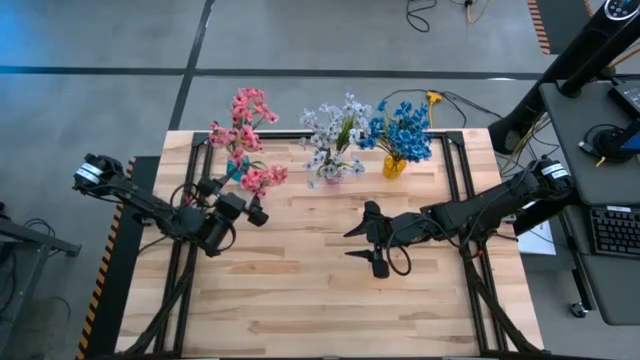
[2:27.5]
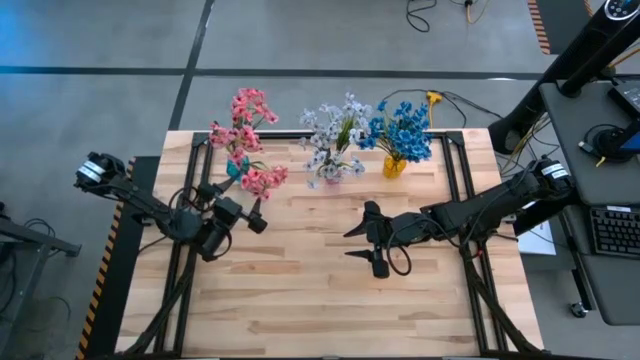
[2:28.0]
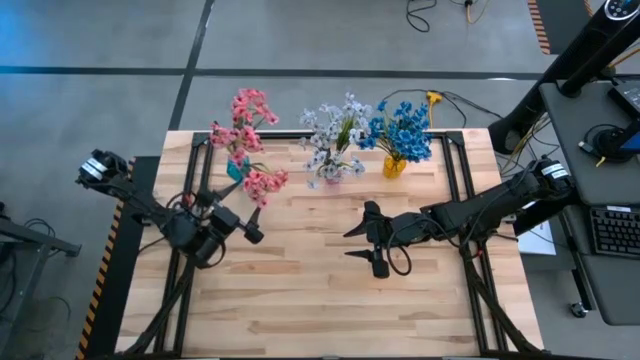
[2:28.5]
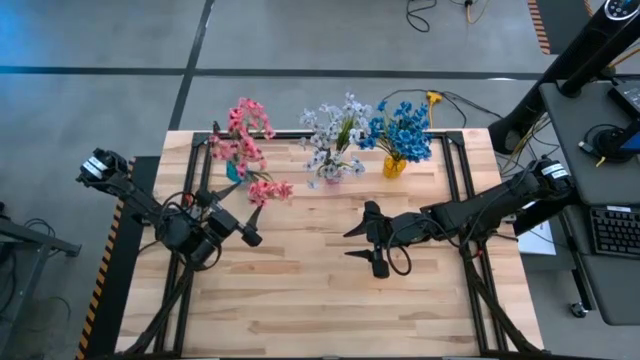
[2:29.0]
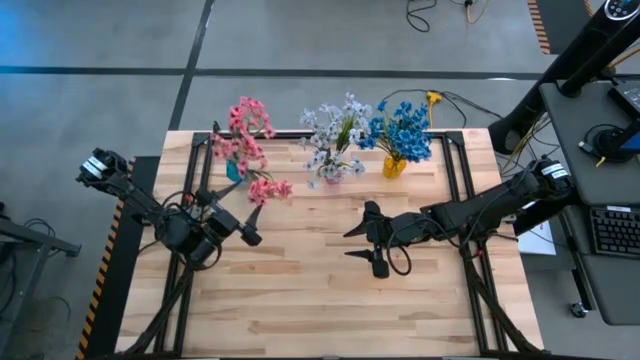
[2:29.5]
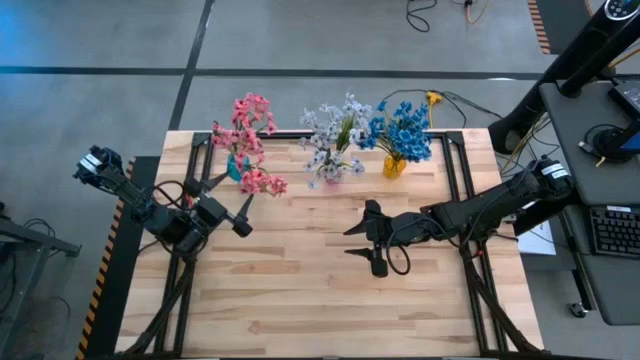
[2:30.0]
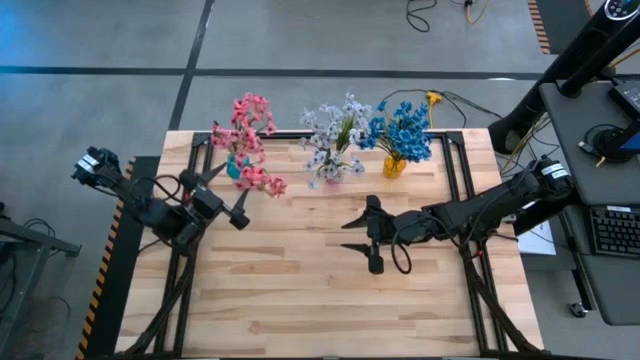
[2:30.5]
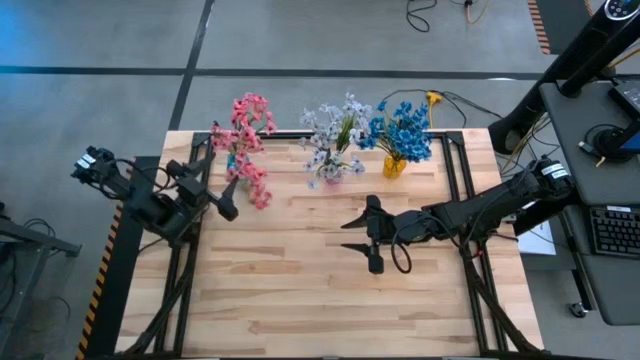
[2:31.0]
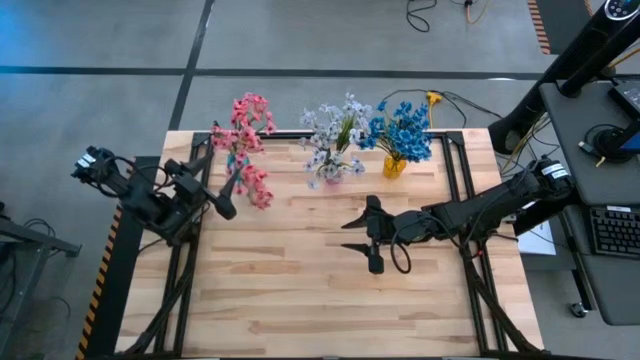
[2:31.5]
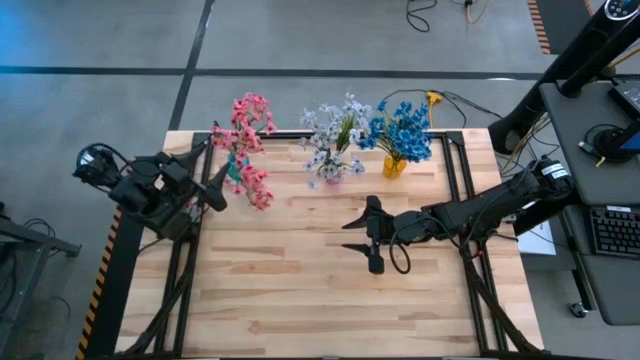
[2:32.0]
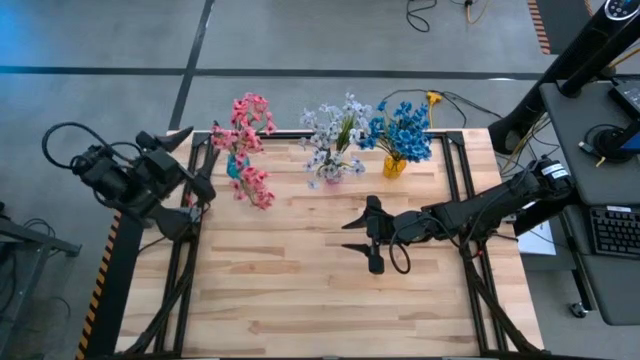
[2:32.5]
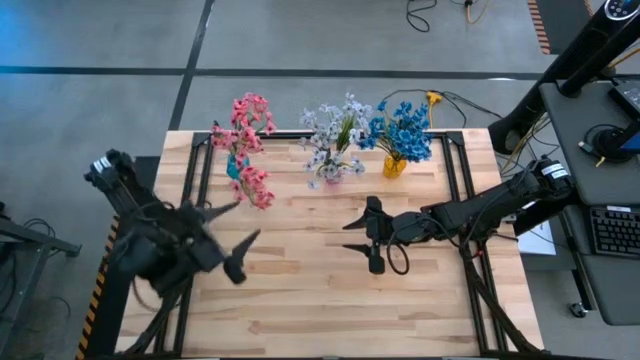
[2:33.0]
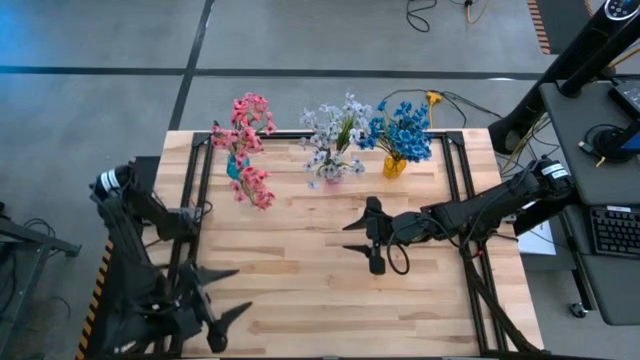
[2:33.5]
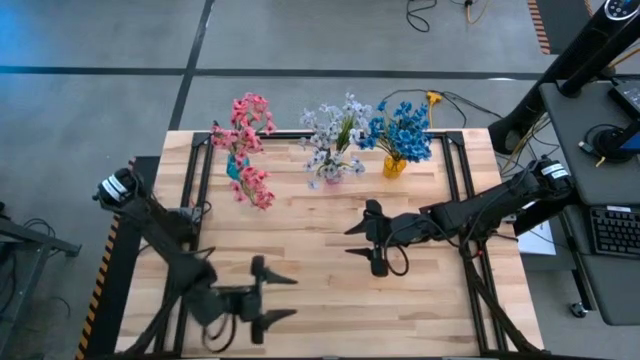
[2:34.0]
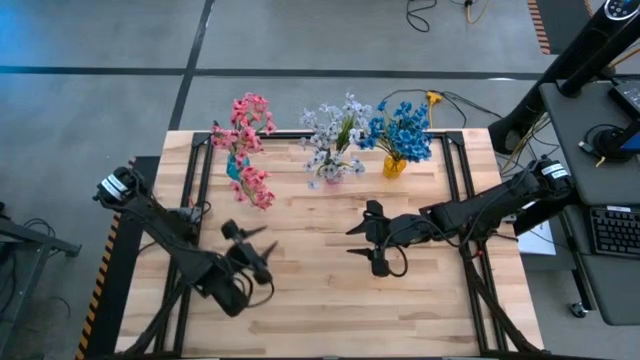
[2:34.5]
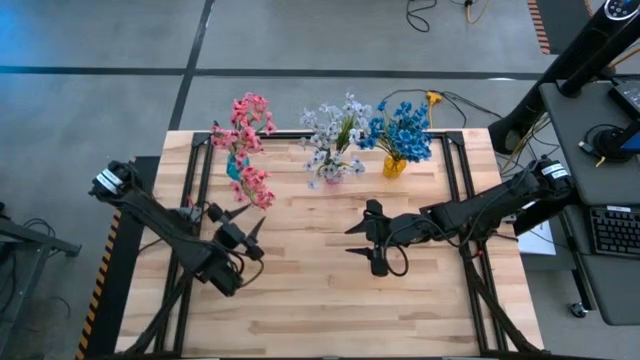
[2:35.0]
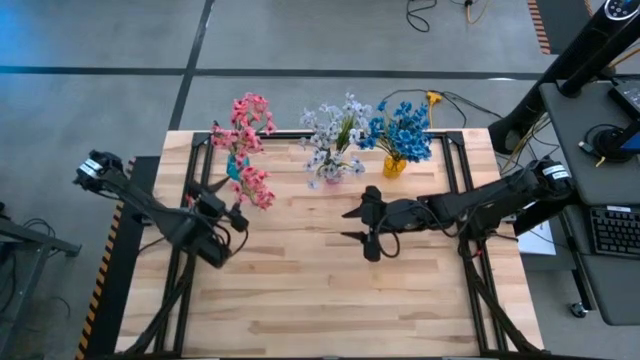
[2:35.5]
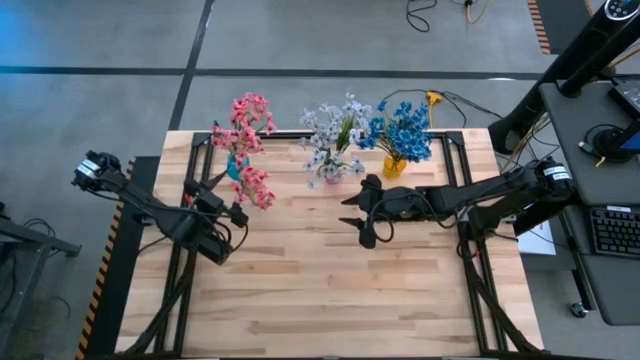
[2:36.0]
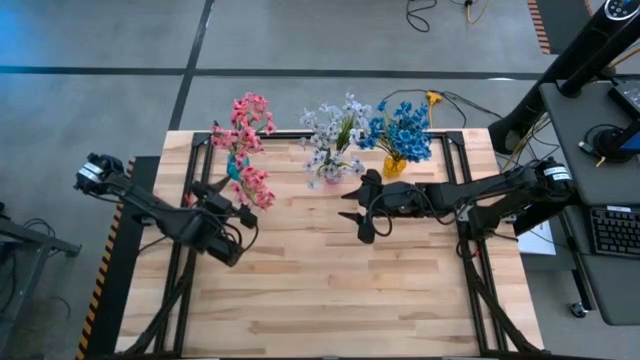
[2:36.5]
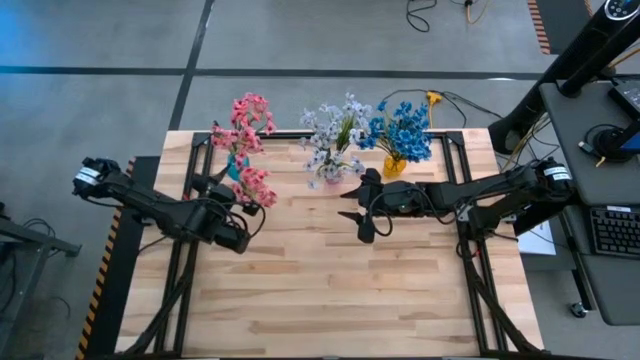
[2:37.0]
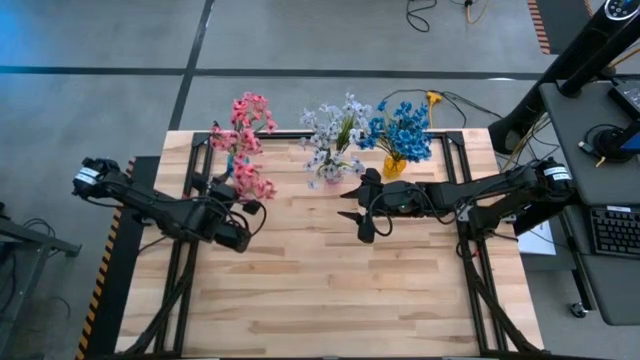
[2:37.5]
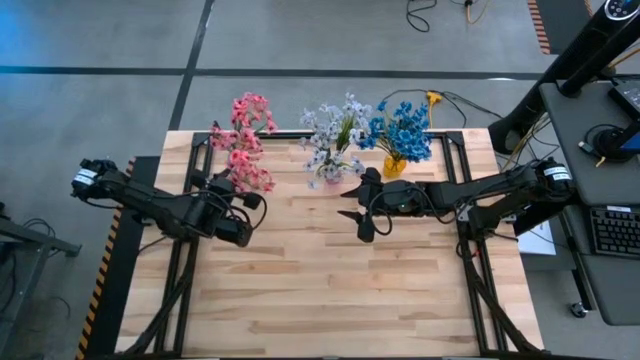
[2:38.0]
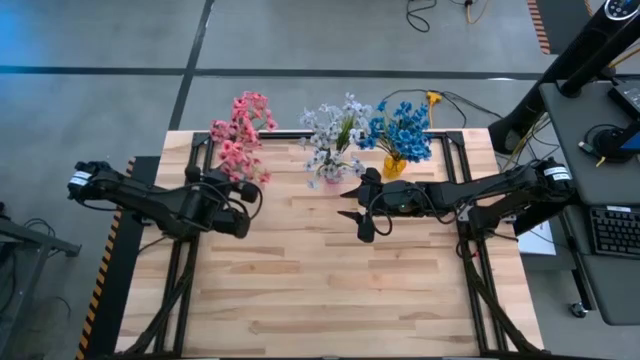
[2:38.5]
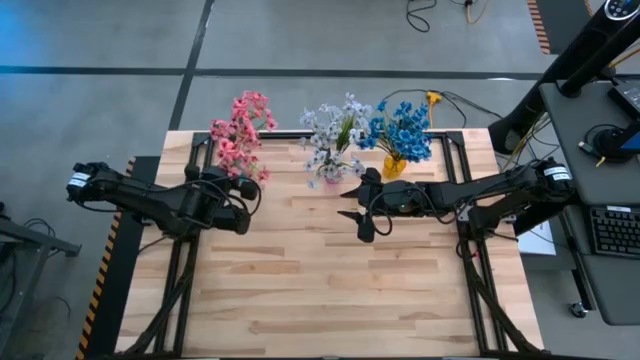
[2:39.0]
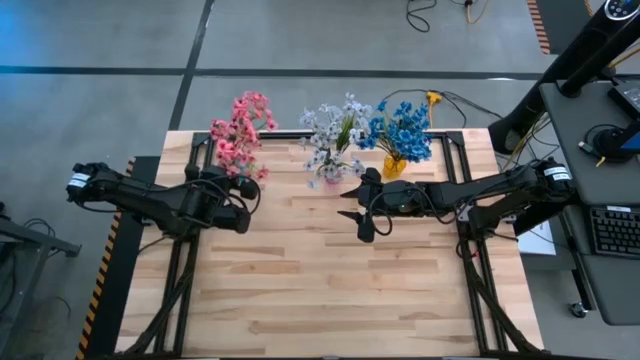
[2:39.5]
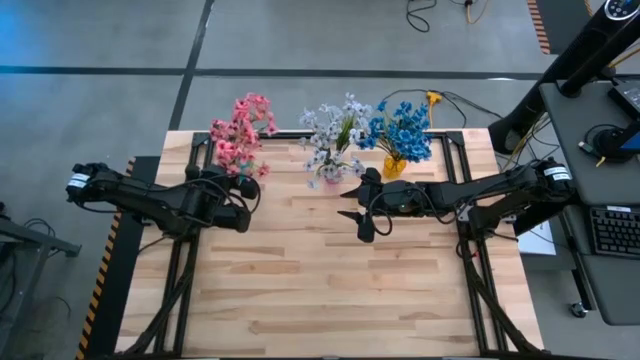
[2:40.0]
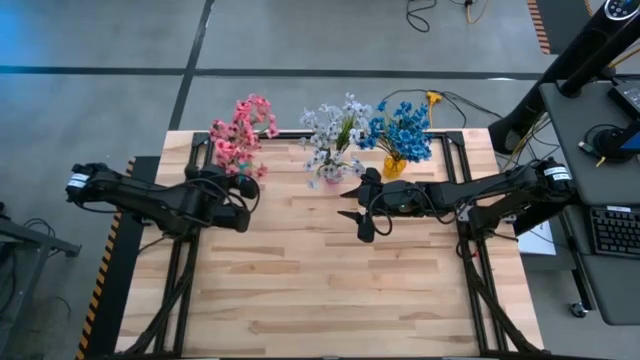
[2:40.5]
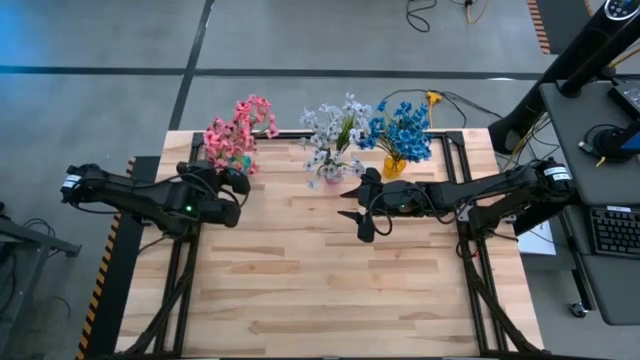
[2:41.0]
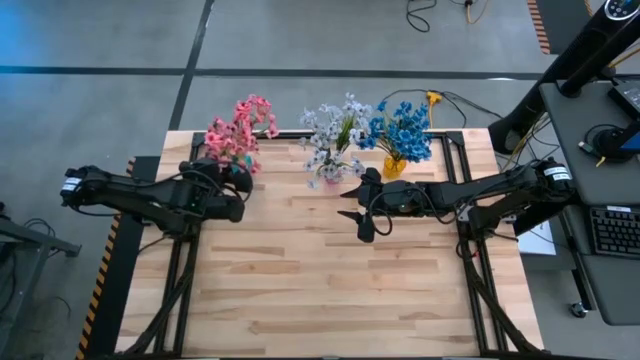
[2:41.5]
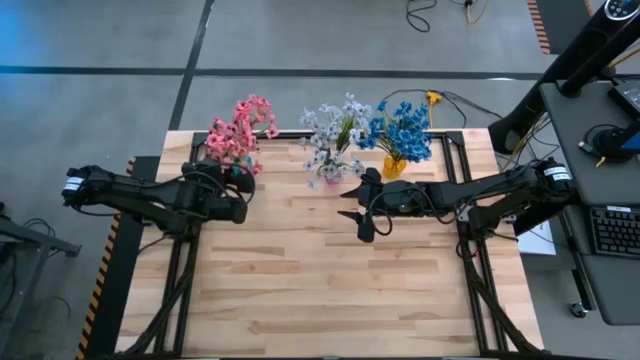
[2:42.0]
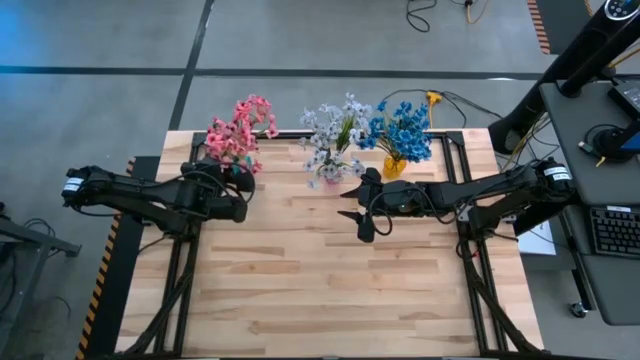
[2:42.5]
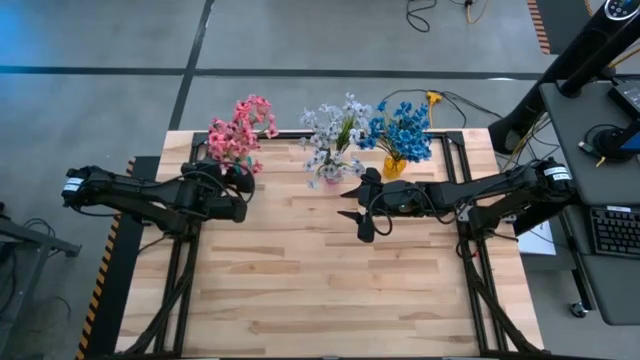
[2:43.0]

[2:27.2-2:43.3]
Task: Sort flowers into vase by color
Put the pink flowers into the blue vase

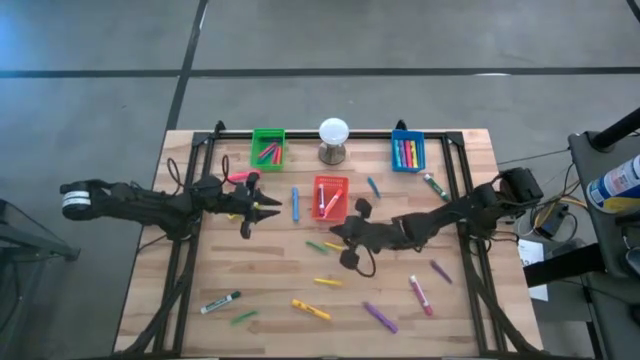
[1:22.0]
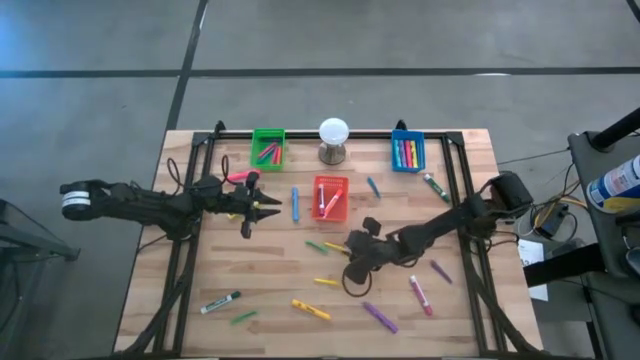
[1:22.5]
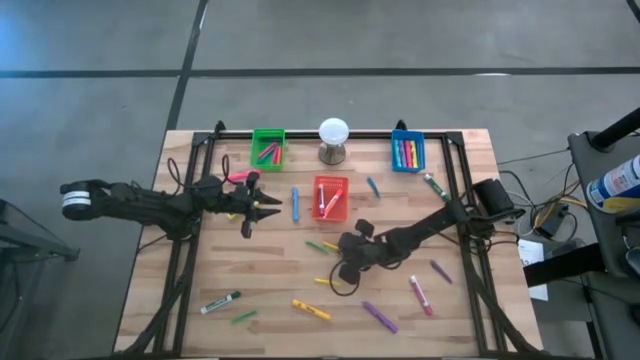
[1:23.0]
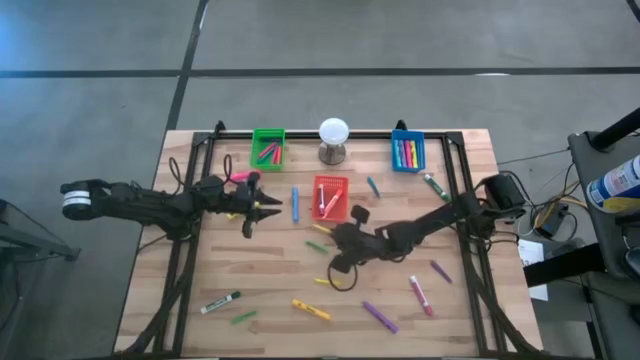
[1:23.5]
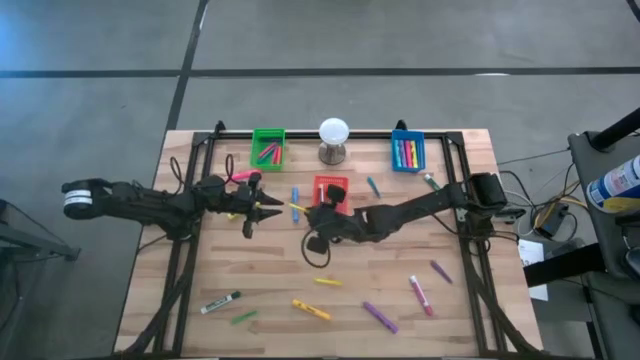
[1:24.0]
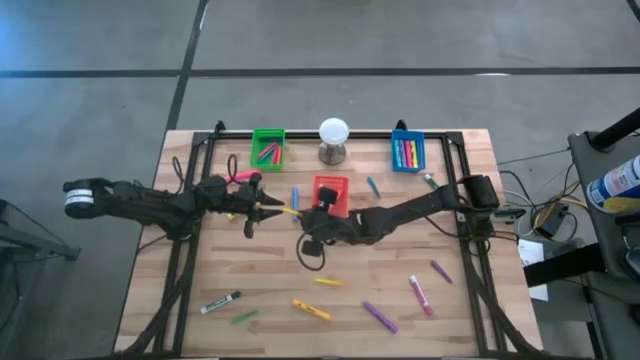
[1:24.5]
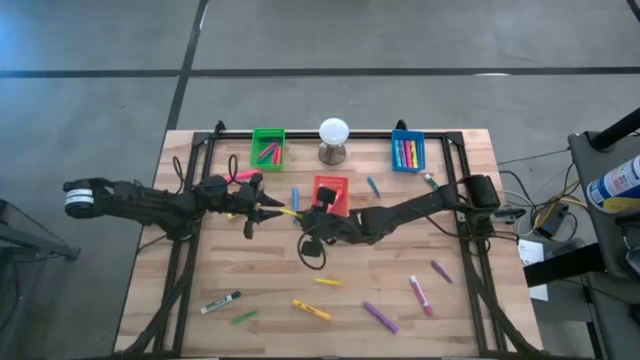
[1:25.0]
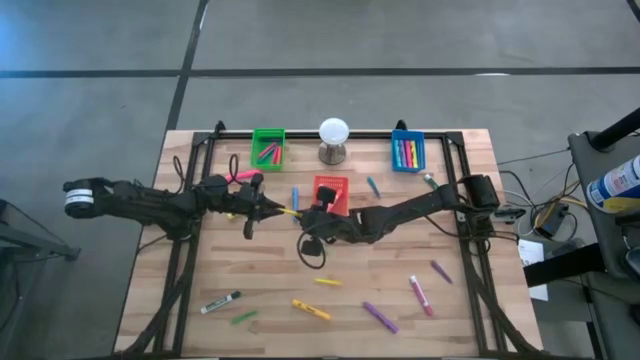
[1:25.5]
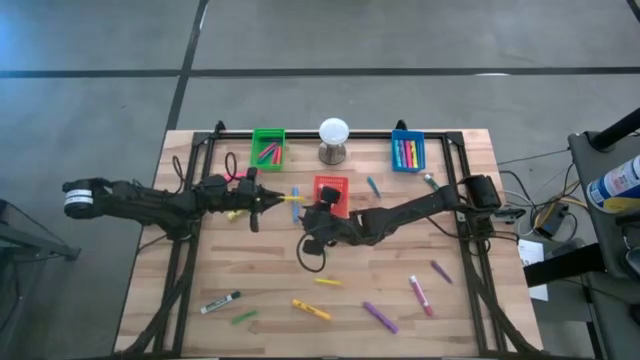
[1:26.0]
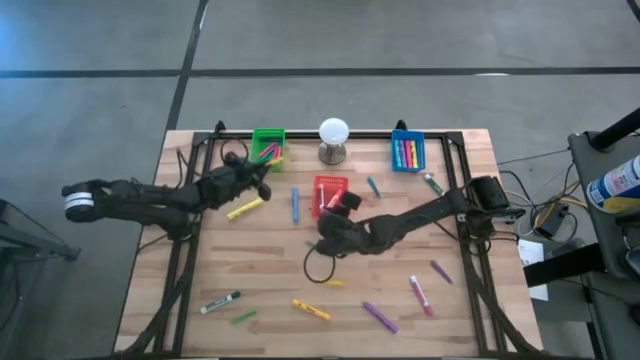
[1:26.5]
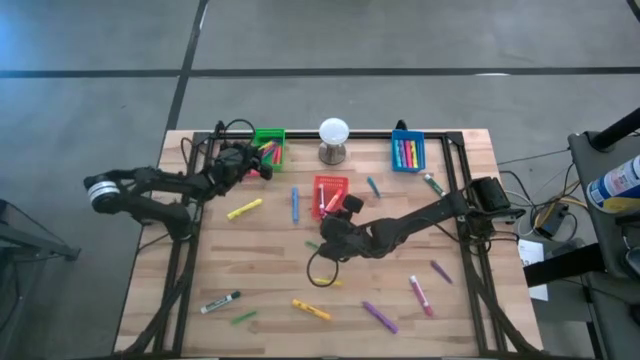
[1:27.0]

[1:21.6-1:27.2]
Task: Pick & Place Markers
Put the top yellow pen into the green bin
